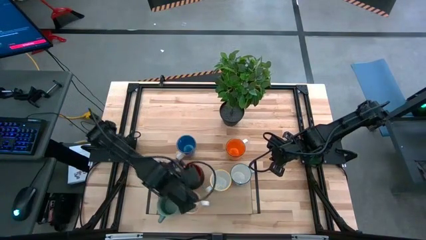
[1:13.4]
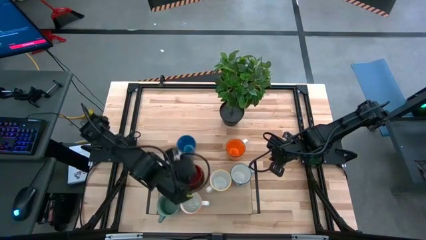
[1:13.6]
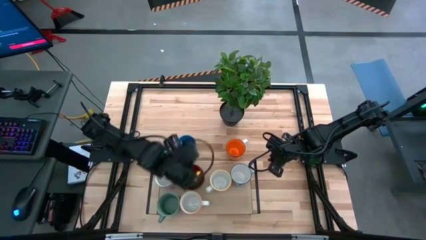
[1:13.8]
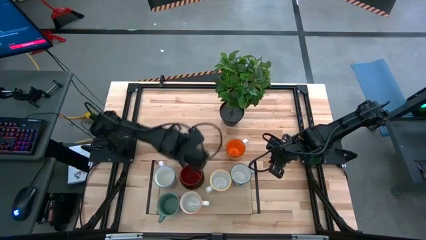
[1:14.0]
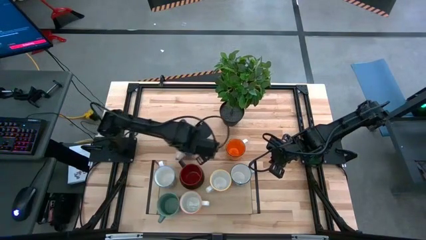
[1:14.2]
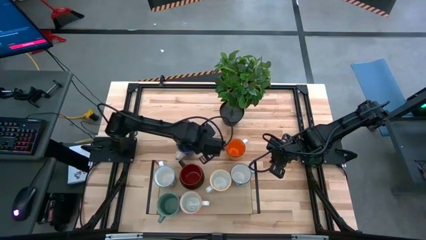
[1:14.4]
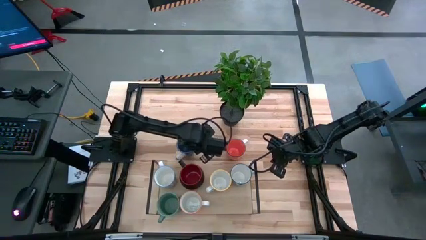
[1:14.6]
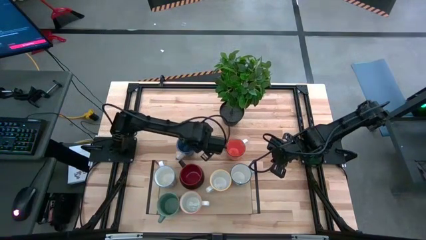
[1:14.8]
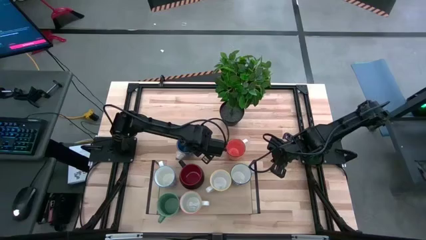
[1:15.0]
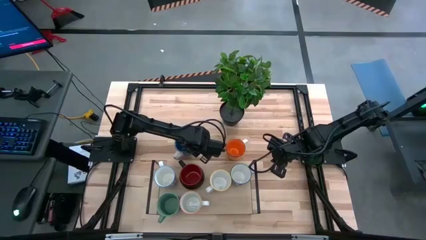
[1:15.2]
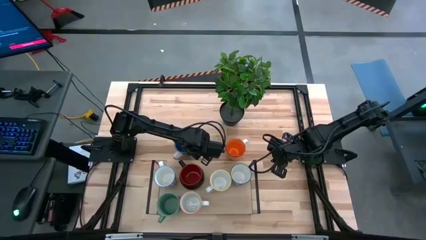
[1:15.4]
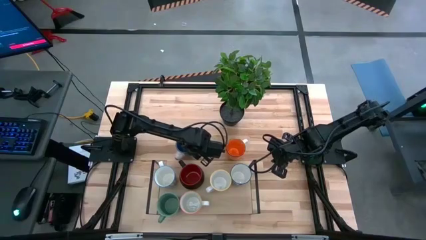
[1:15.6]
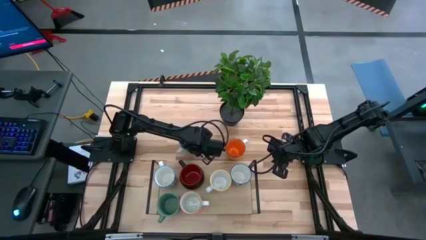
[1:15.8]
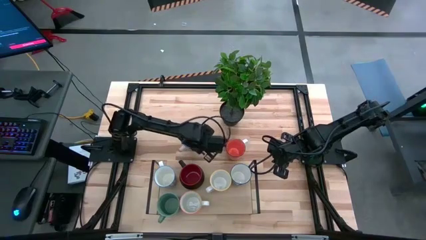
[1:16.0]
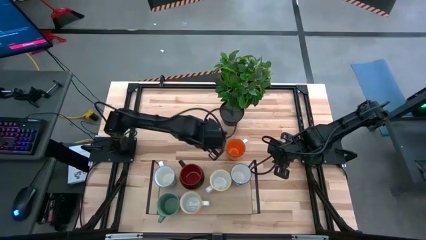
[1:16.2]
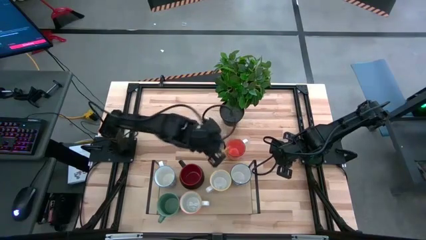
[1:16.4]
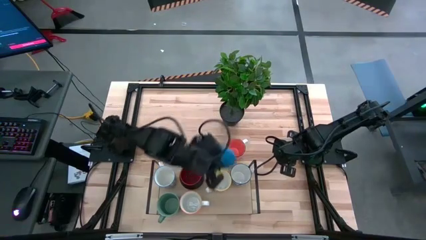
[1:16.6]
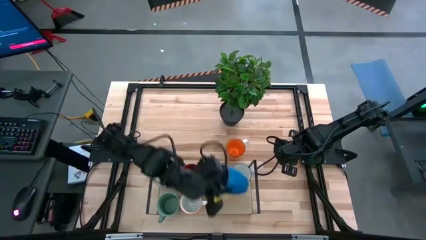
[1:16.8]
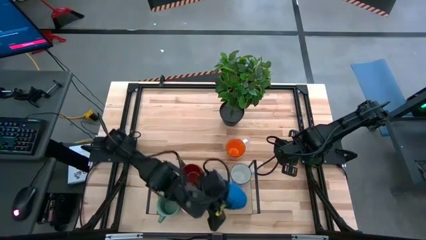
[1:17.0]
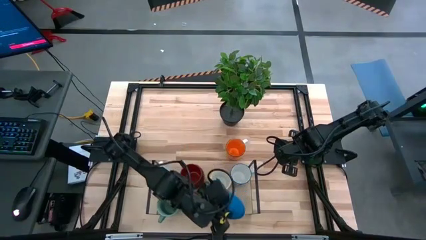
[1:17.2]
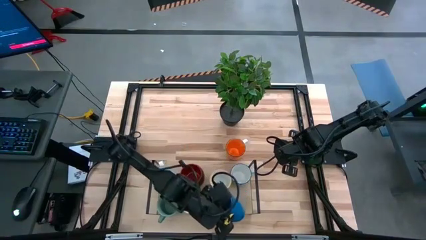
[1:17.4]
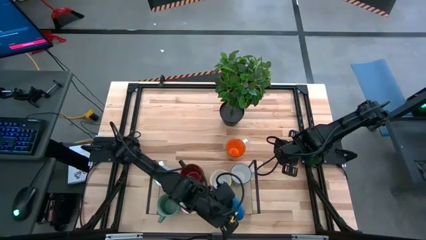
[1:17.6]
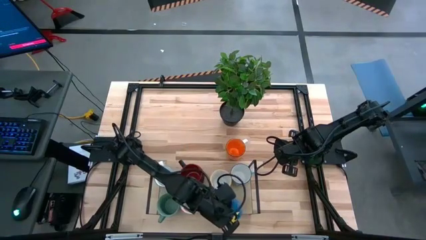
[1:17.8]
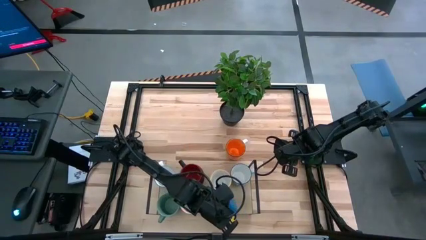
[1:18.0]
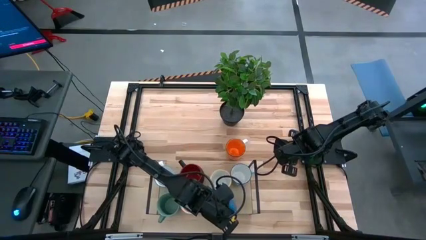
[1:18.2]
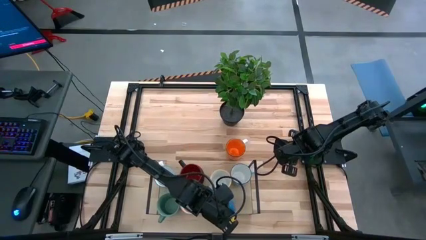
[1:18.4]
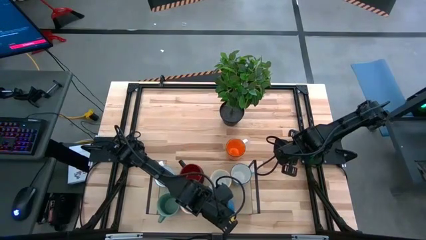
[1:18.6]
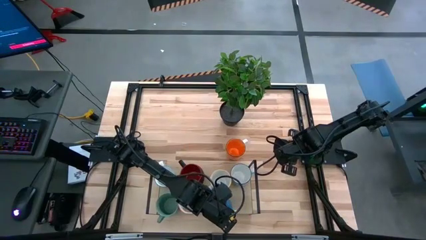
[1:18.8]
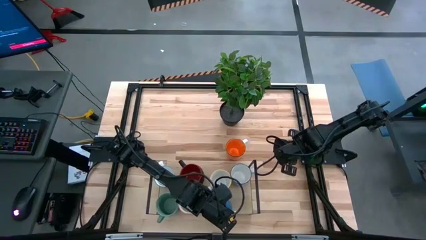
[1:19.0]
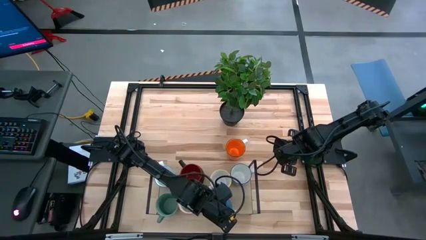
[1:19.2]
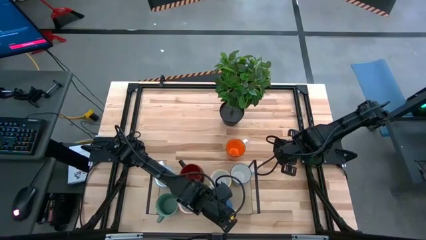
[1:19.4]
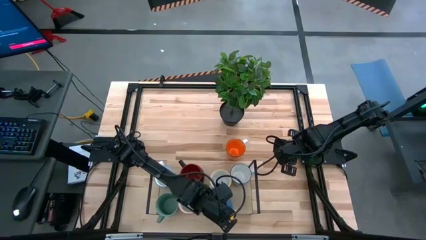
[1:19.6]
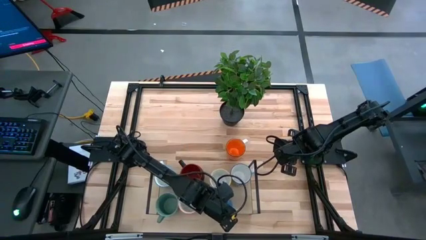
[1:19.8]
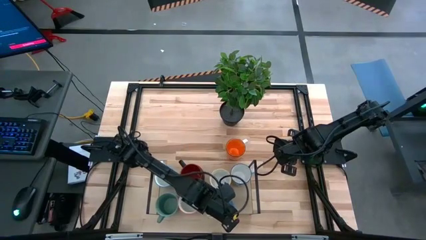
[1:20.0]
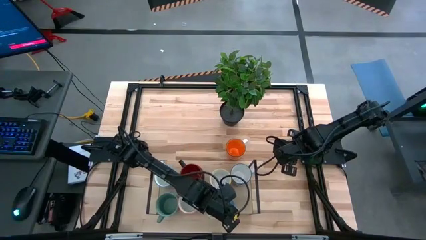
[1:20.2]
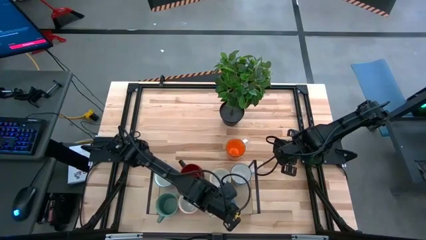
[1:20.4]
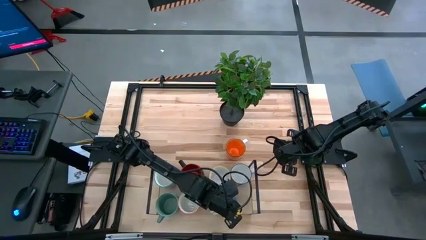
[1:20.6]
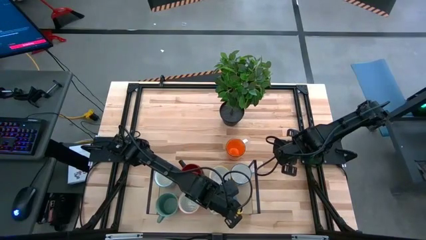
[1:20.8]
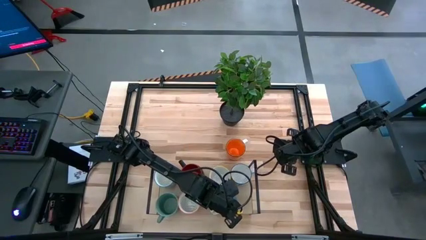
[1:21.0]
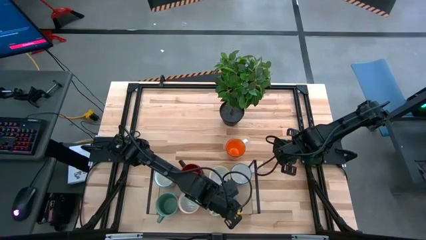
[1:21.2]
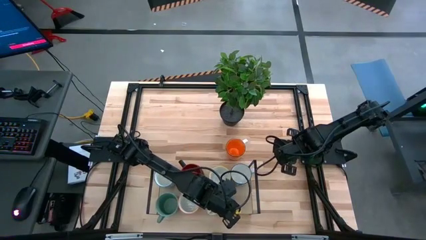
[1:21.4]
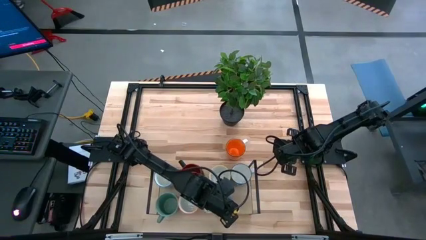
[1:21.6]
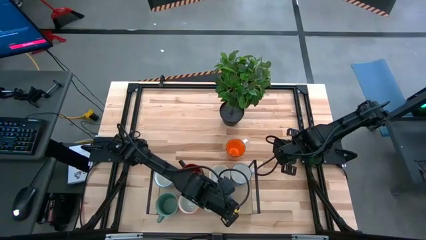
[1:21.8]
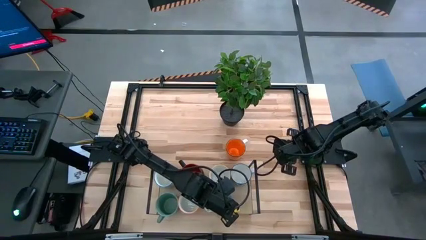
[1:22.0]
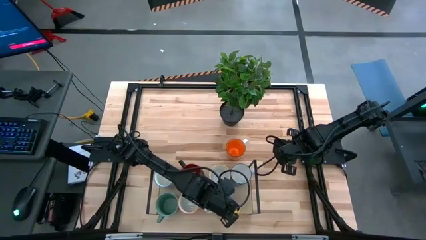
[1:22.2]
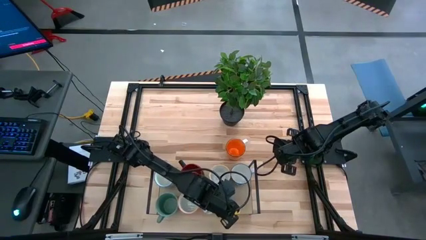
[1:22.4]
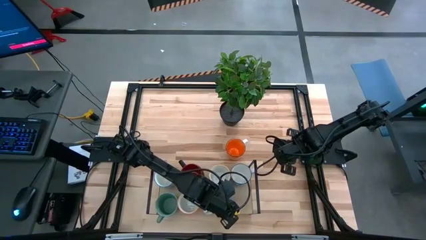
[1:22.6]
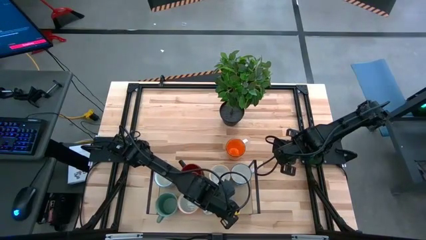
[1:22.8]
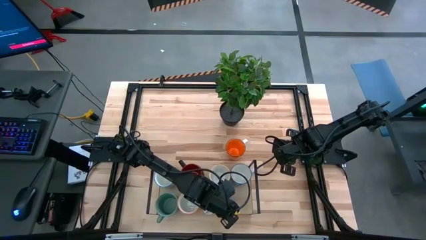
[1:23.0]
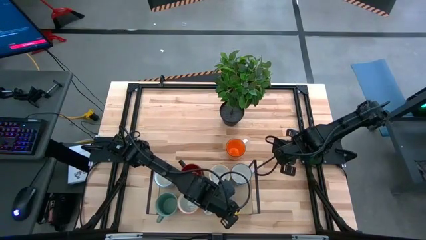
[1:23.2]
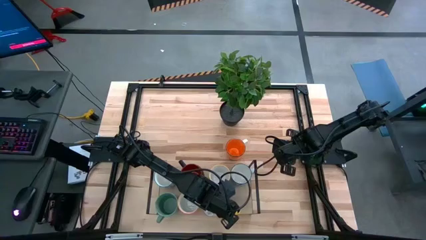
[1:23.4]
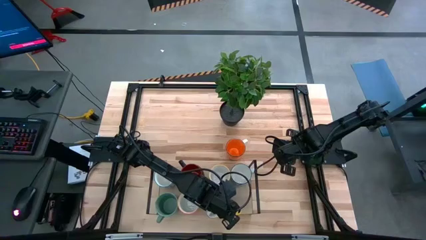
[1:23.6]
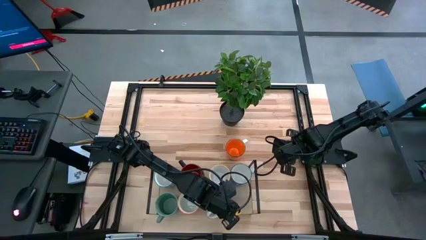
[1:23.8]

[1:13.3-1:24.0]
Task: Place coffee mugs
Put the blue mug on the shelf

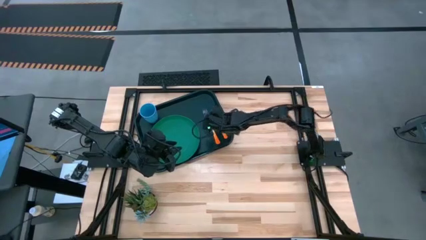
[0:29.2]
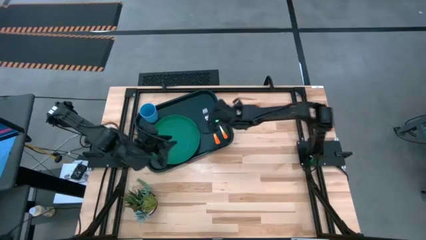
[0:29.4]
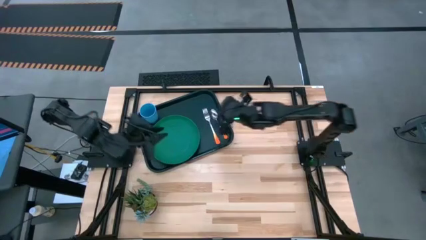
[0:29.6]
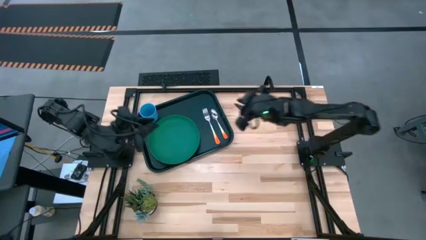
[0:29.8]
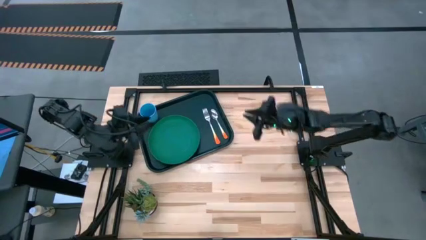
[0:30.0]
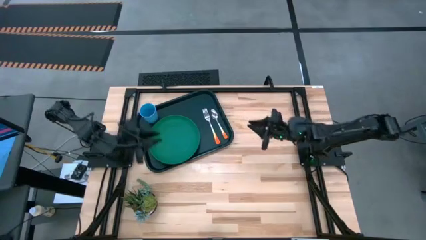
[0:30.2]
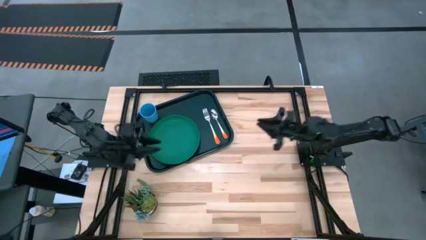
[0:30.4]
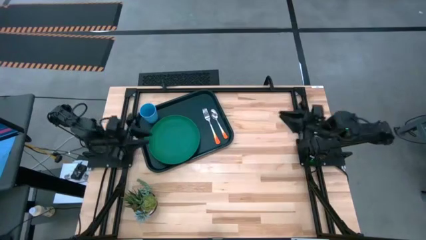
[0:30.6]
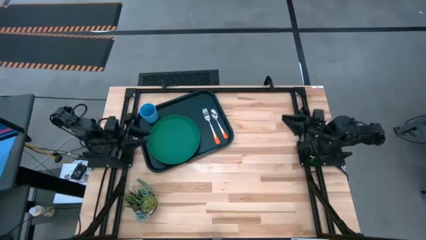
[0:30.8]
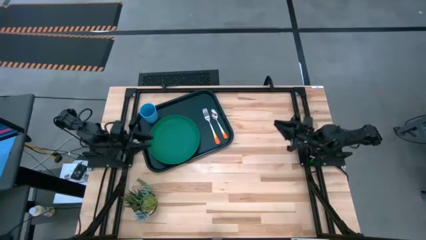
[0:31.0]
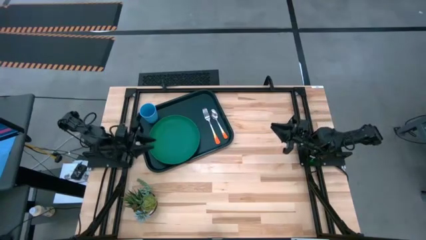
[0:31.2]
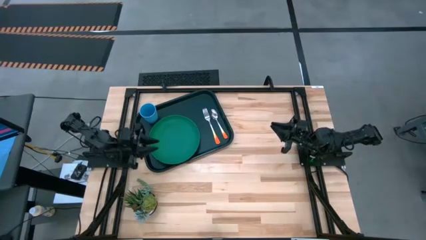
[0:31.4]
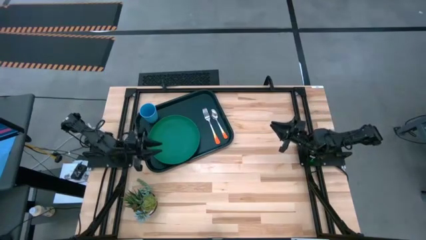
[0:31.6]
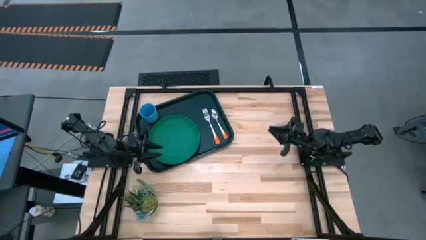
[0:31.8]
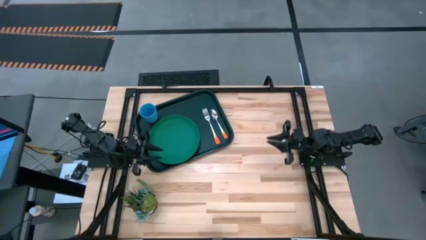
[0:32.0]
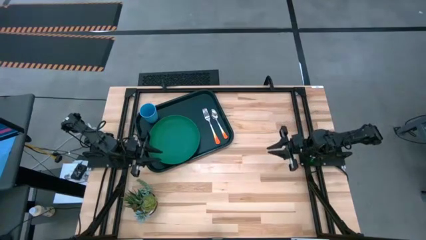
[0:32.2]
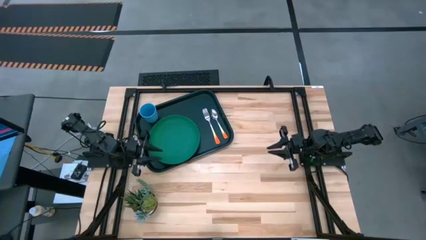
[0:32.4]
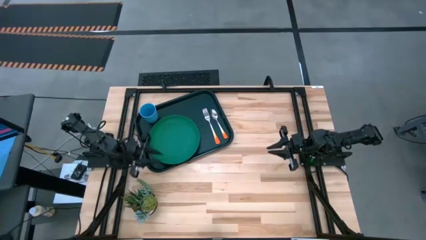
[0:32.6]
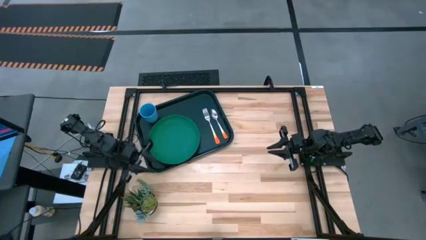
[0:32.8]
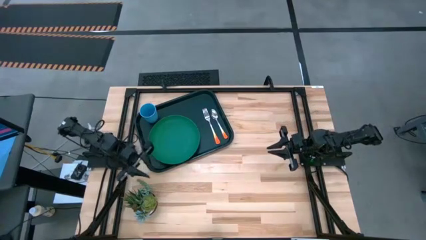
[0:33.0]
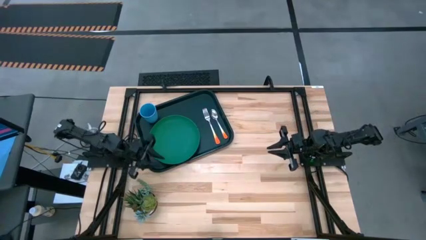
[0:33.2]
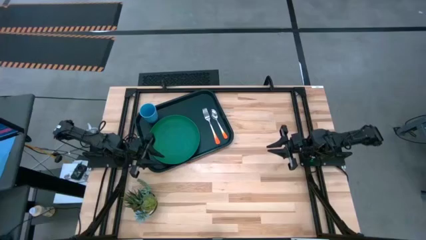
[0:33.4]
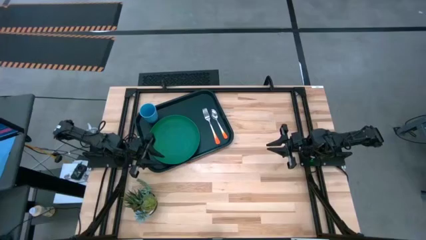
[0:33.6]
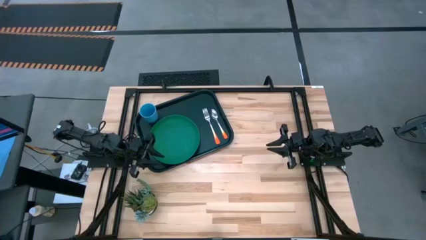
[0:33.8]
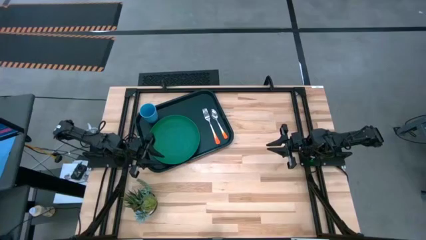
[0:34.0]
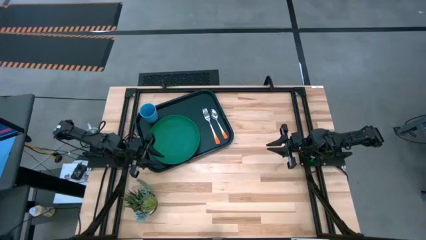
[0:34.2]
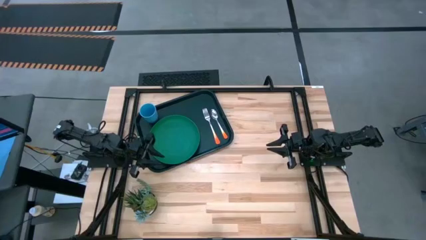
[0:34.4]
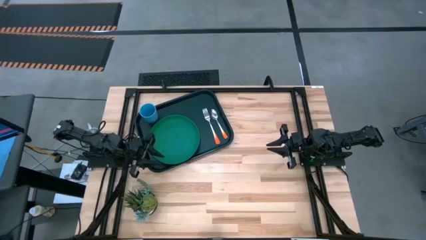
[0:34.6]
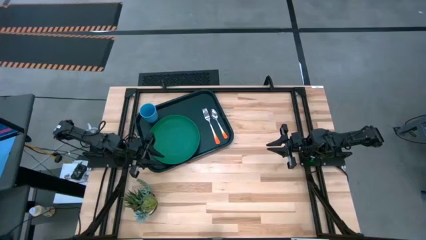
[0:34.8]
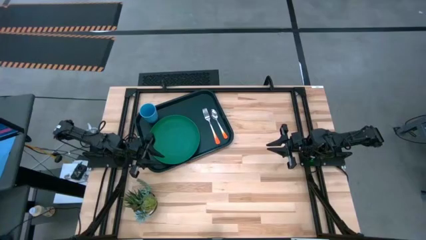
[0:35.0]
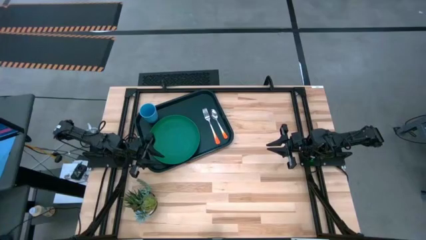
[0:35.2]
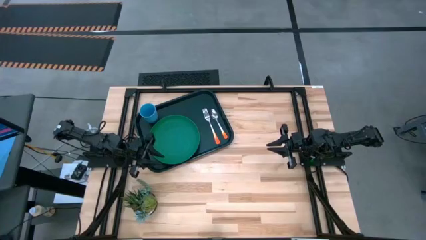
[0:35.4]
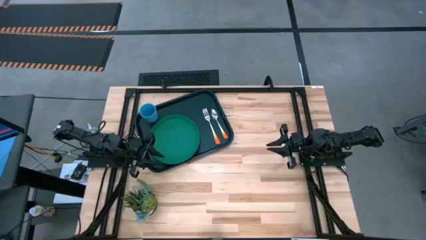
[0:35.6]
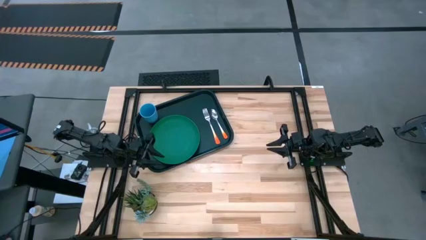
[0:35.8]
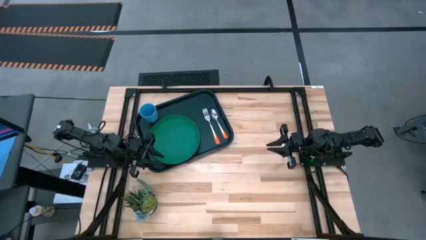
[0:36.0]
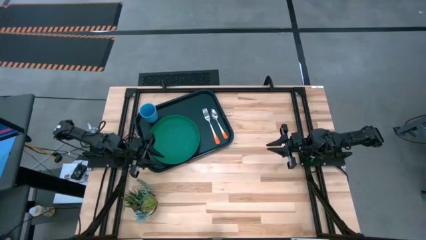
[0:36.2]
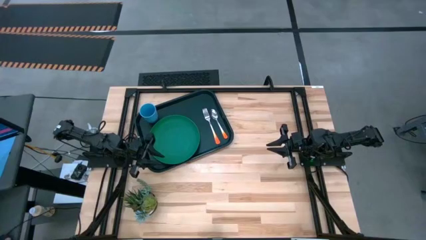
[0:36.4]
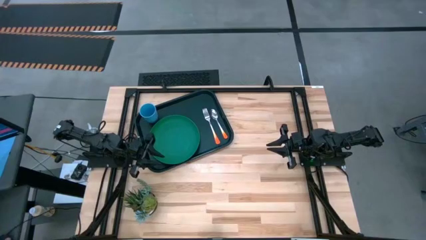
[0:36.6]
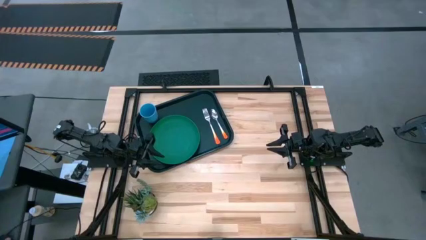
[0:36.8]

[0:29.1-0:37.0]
Task: Pick and place plate/cup/fork/spoon on tray
Return to Home Position
